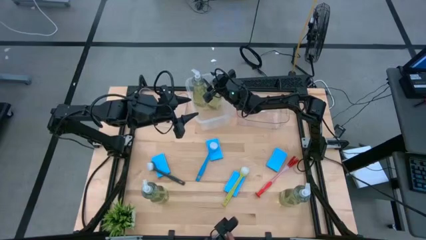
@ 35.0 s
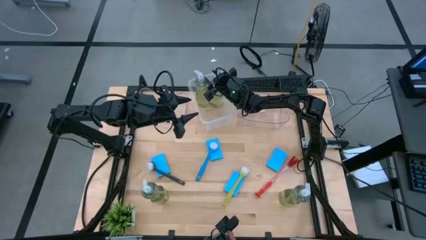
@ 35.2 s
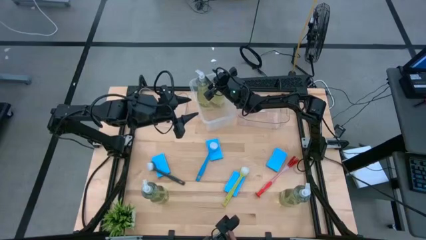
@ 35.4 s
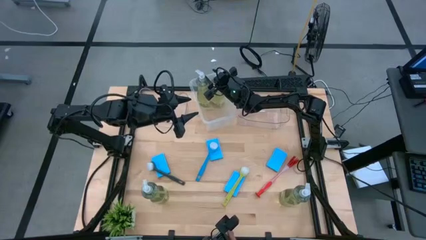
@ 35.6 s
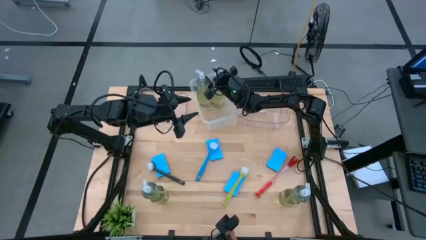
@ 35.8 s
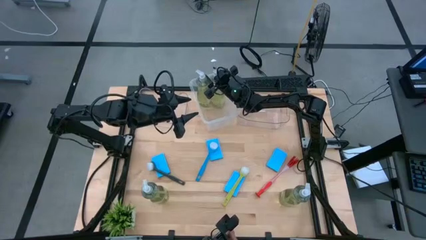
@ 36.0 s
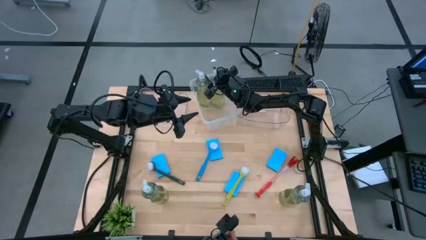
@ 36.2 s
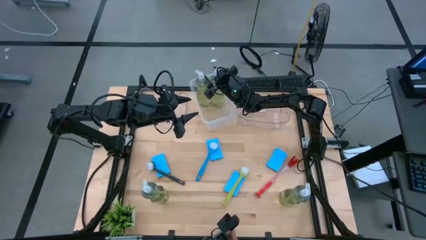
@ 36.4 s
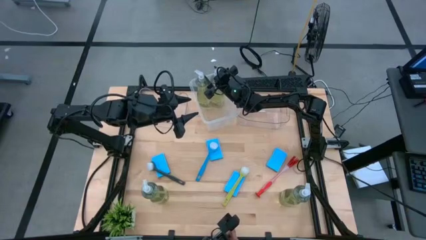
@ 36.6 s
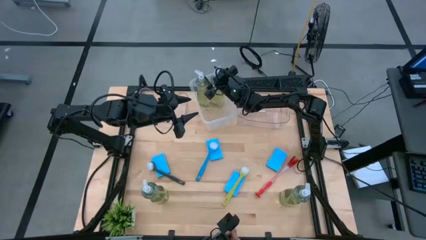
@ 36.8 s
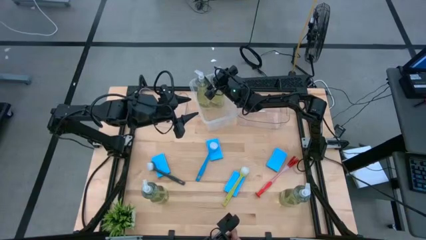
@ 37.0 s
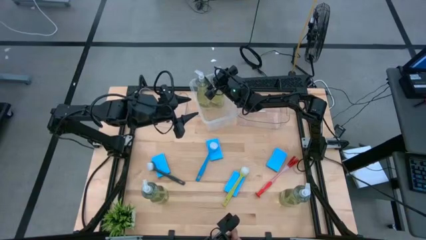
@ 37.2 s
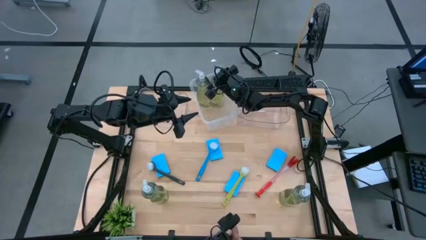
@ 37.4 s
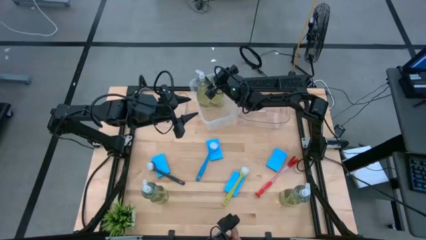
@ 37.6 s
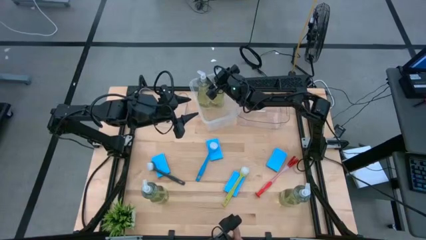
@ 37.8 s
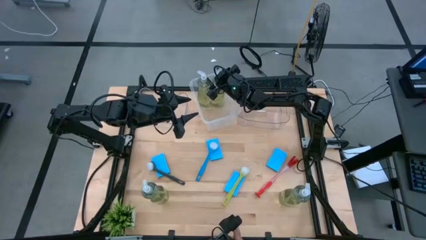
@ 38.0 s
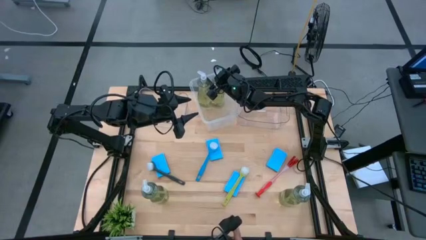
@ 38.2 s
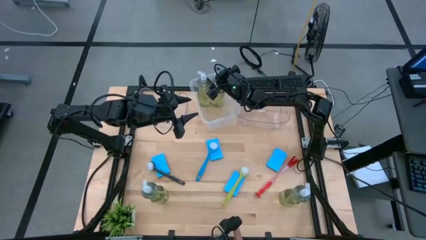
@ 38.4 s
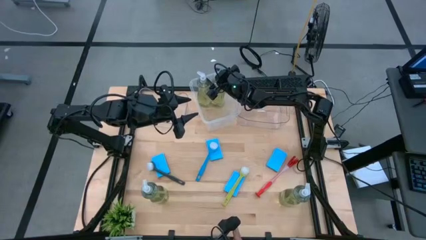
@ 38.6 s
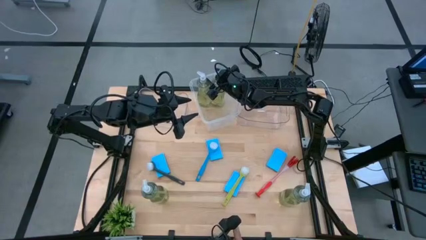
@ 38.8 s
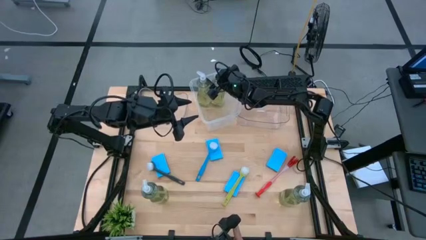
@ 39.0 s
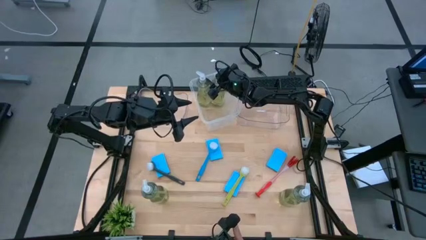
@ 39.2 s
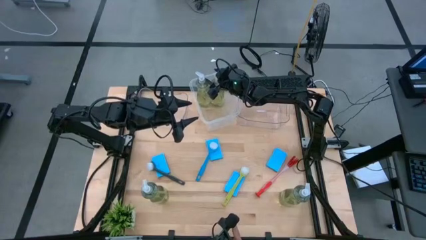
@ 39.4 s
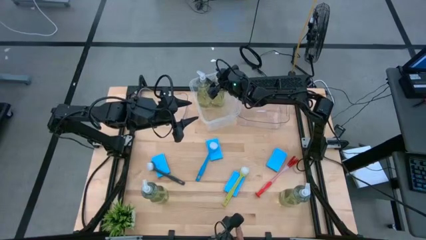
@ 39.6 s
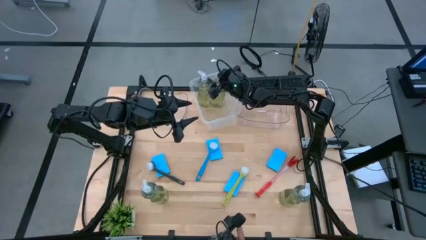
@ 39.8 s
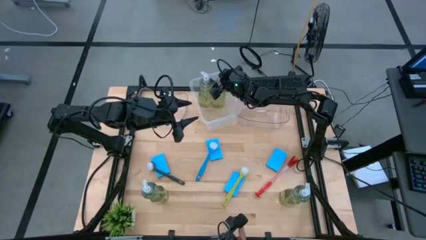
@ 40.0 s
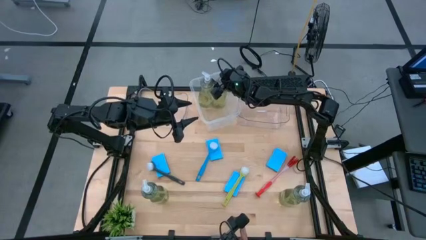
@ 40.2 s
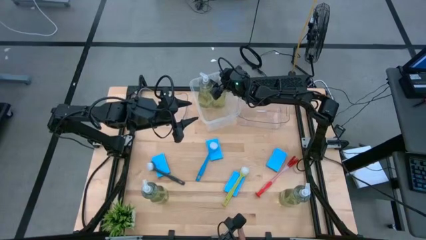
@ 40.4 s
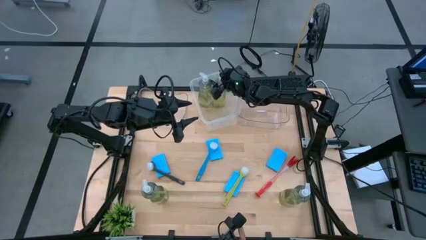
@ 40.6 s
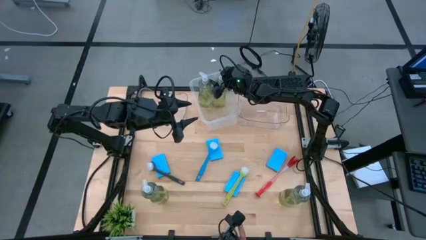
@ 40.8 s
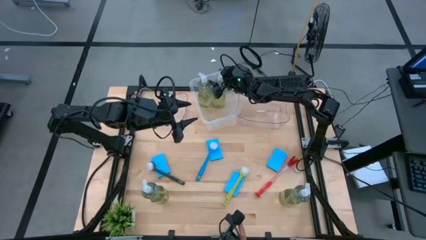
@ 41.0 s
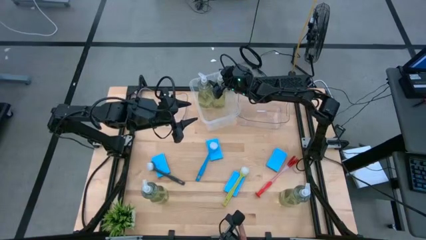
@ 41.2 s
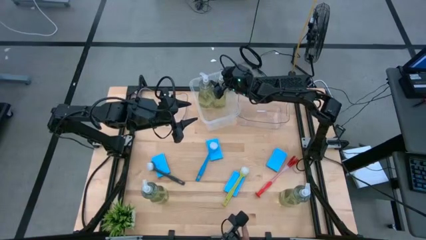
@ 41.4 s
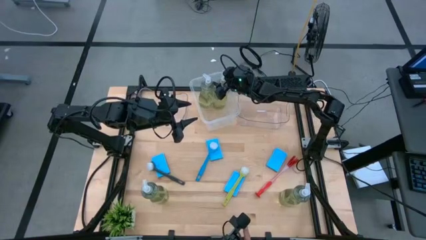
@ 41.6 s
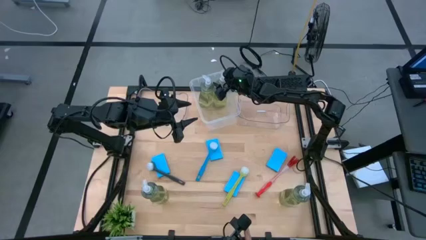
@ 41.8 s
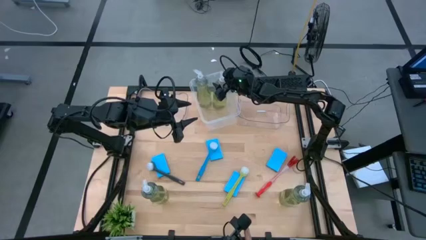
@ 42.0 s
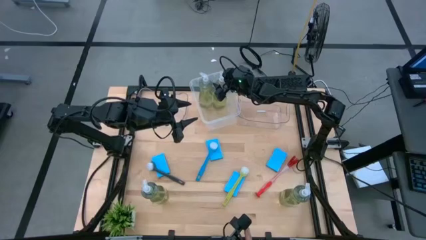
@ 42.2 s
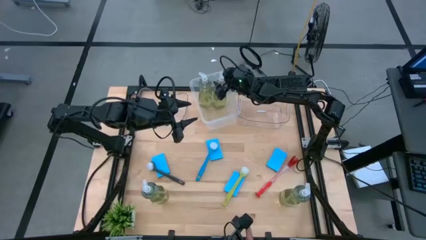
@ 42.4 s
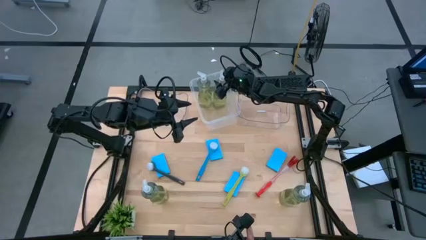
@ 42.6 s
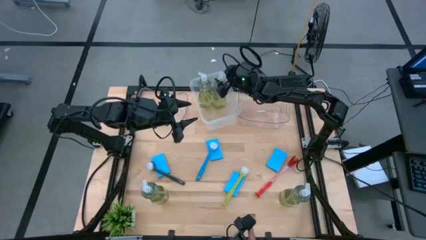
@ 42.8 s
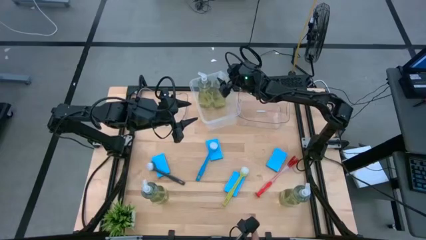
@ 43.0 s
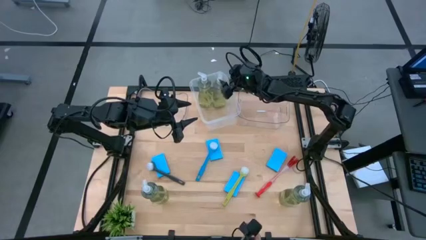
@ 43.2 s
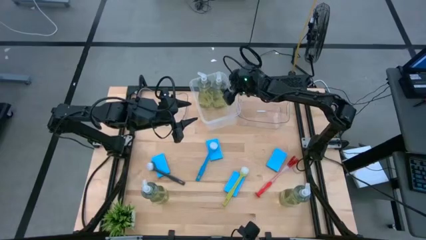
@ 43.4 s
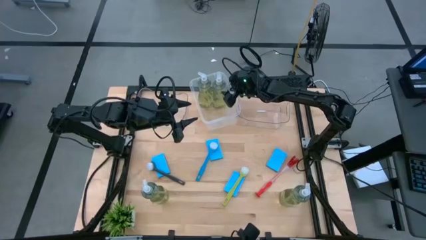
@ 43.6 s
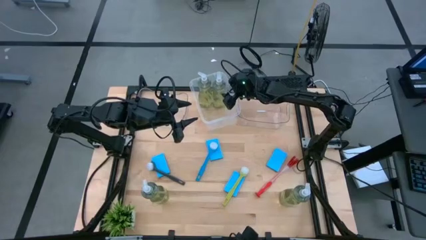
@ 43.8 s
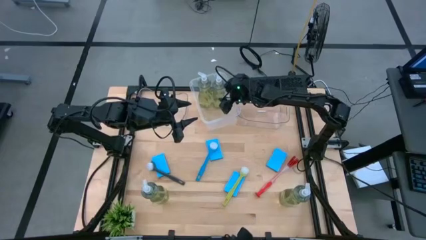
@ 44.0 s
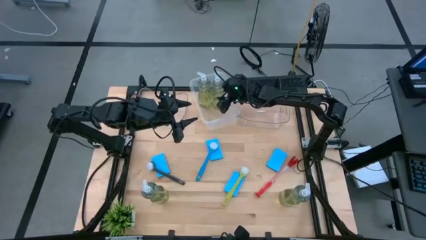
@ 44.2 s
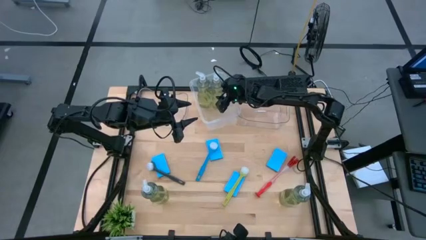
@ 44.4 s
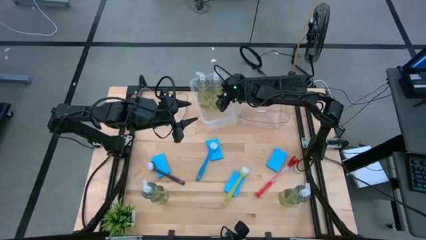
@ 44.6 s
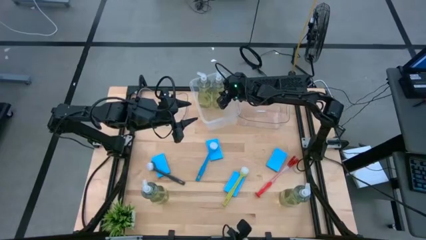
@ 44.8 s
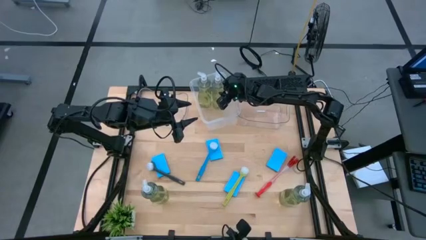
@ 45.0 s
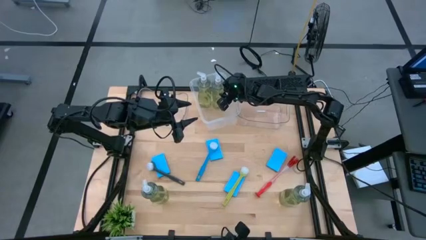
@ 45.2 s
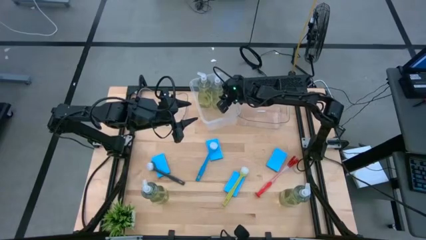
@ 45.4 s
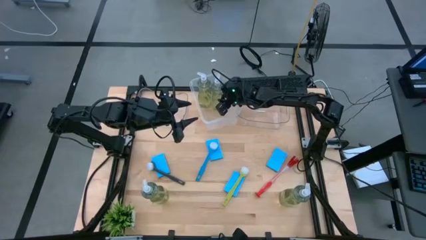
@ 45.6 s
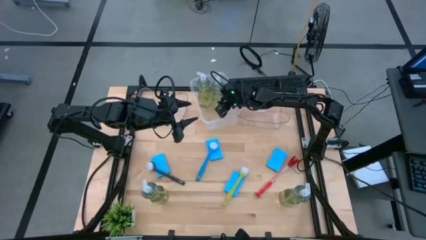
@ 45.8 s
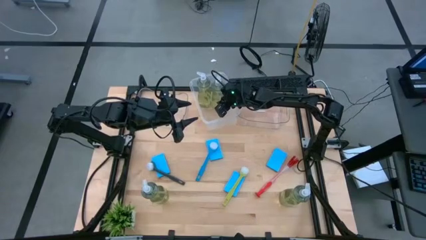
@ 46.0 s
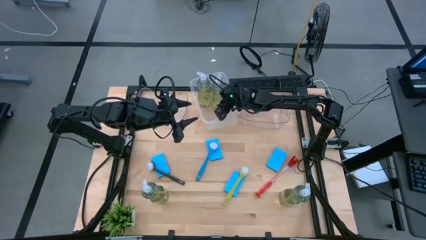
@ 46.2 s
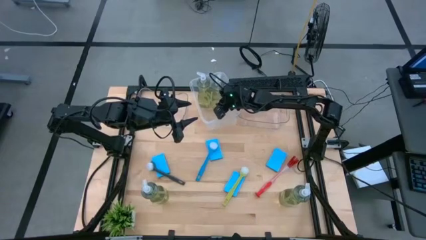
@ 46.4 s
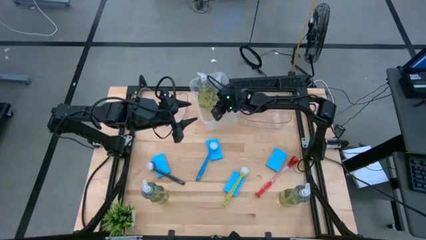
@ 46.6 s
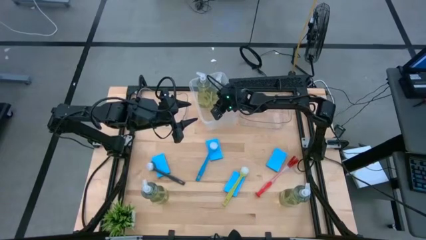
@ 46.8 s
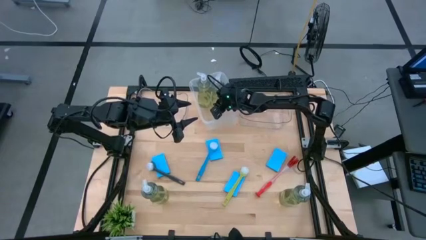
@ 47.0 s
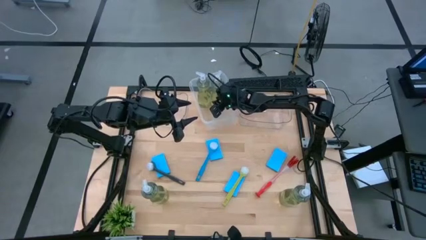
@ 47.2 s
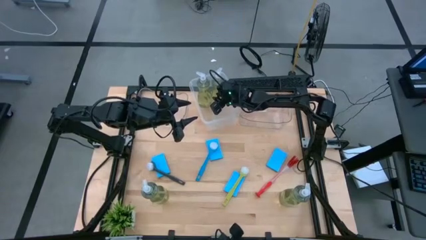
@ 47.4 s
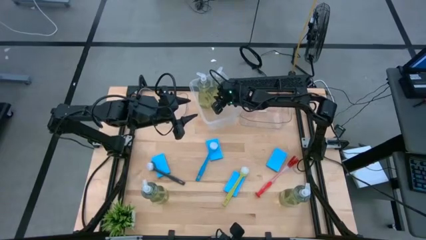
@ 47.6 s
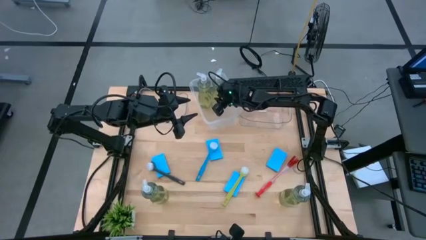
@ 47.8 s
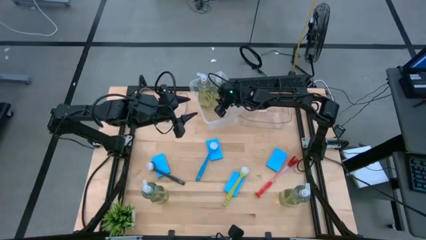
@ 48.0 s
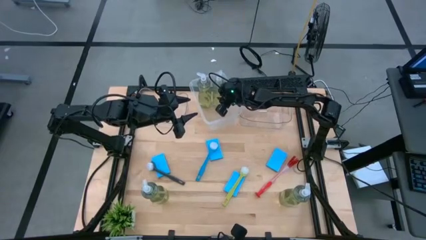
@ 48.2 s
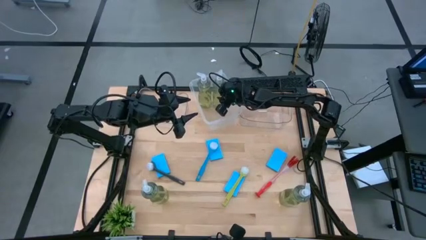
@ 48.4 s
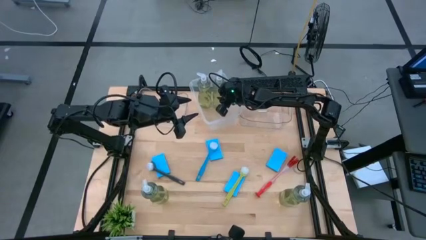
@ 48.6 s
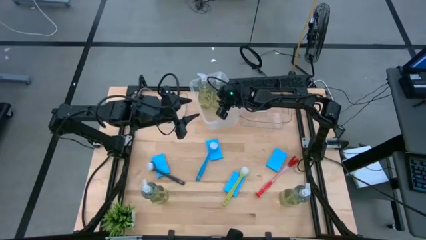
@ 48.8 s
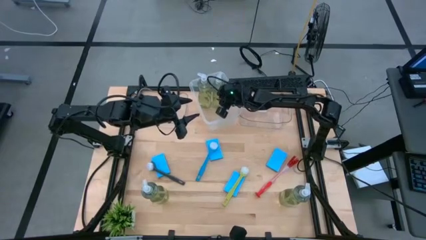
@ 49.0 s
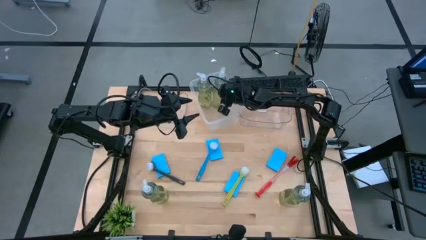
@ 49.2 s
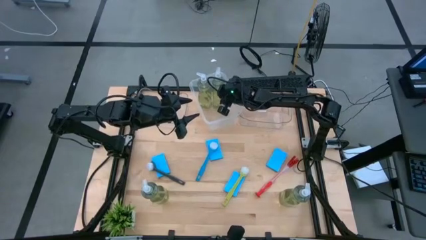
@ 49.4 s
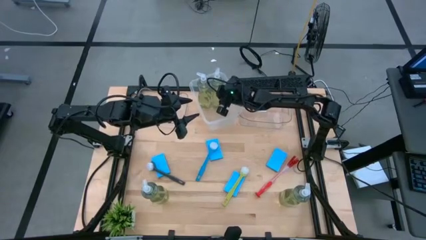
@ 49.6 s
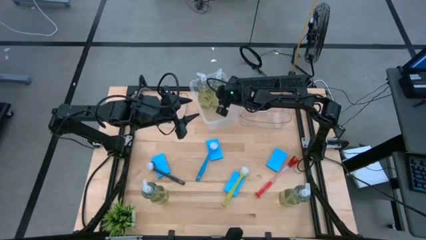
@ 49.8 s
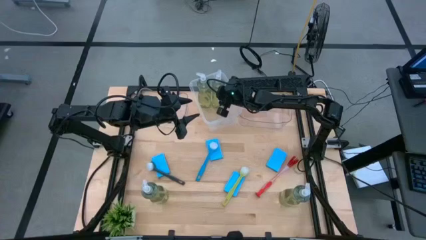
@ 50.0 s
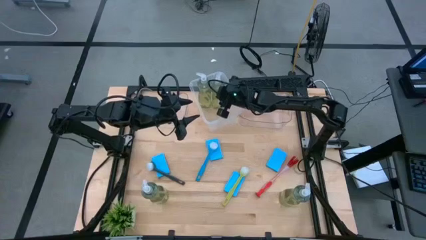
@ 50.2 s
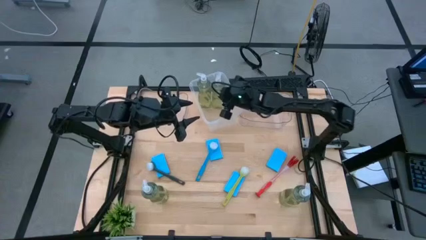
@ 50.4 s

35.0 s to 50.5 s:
Task: Pick & Place Kitchen Sink Supplies
Put the dishwashing liquid bottle into the white bin
